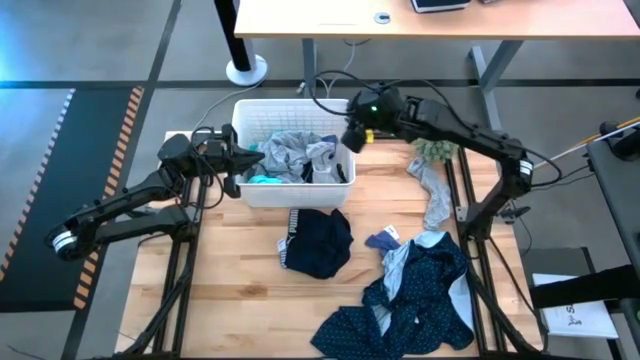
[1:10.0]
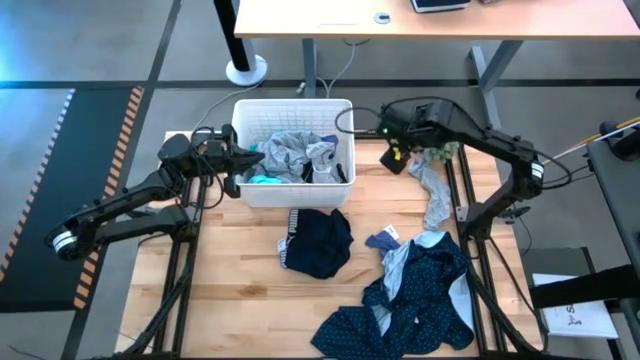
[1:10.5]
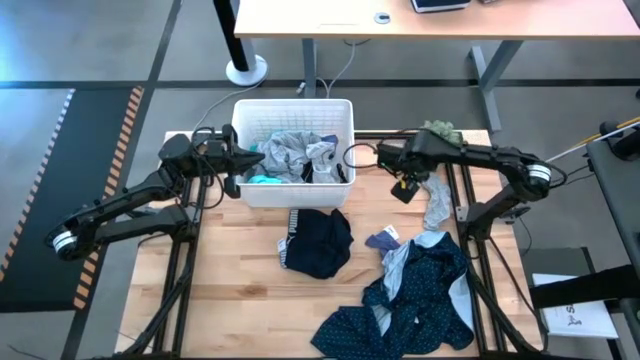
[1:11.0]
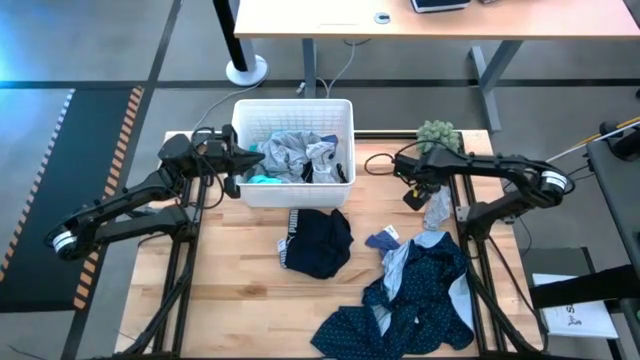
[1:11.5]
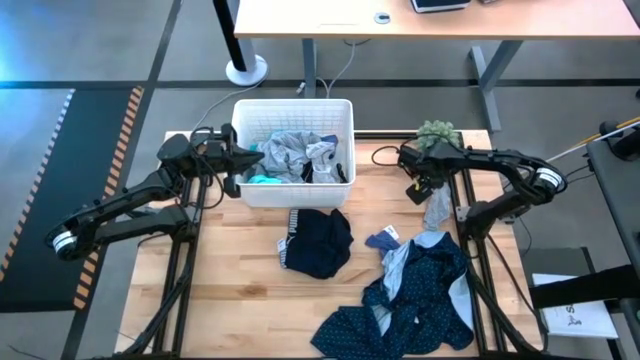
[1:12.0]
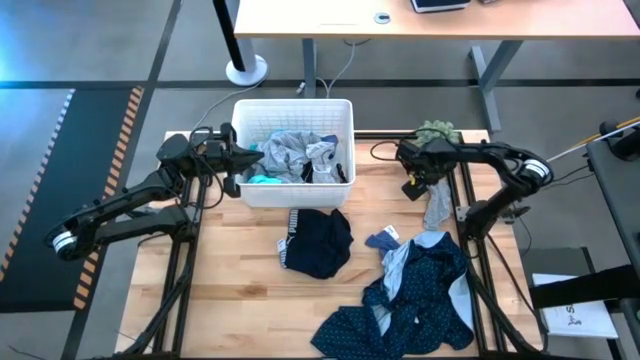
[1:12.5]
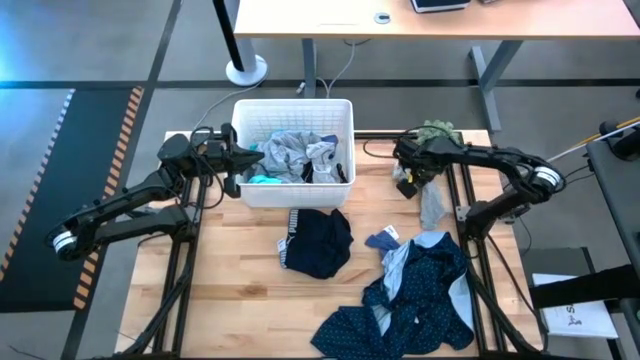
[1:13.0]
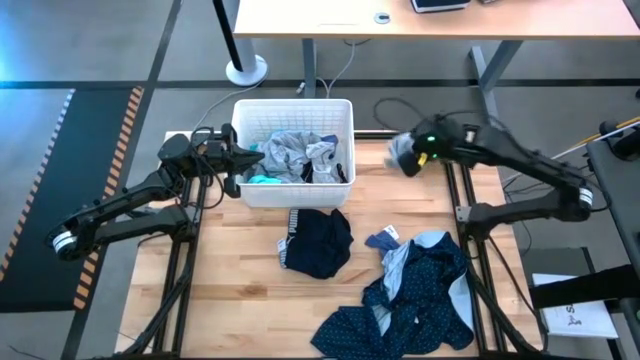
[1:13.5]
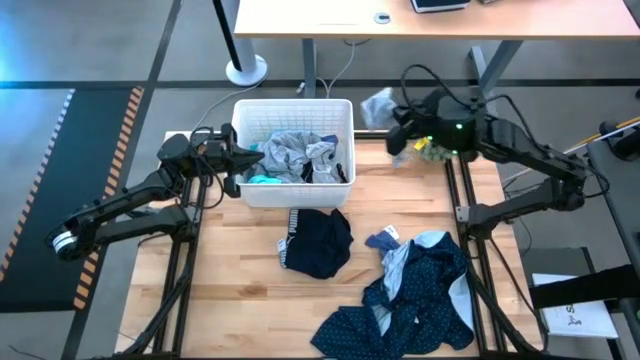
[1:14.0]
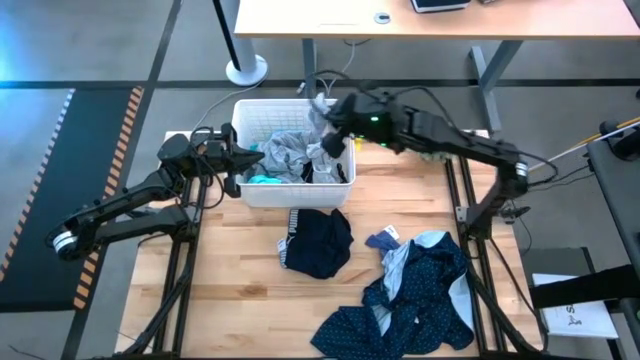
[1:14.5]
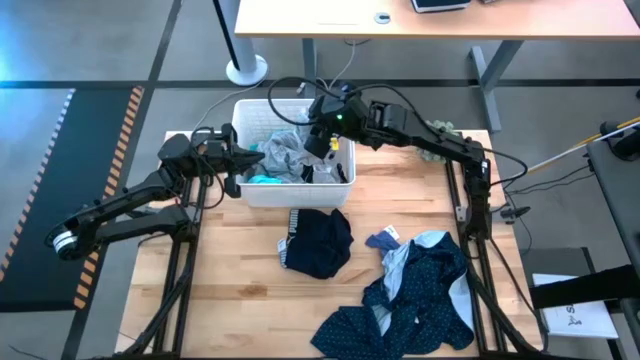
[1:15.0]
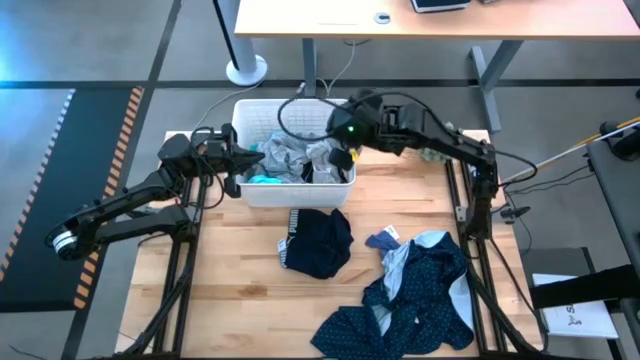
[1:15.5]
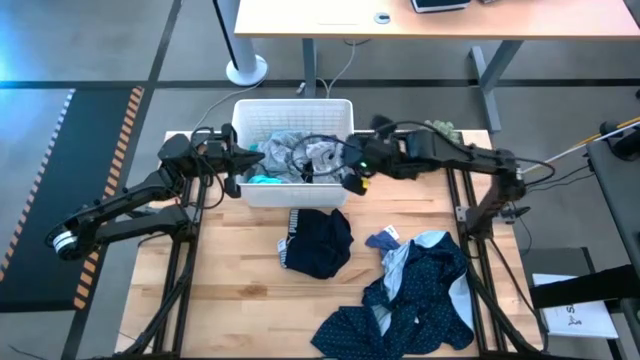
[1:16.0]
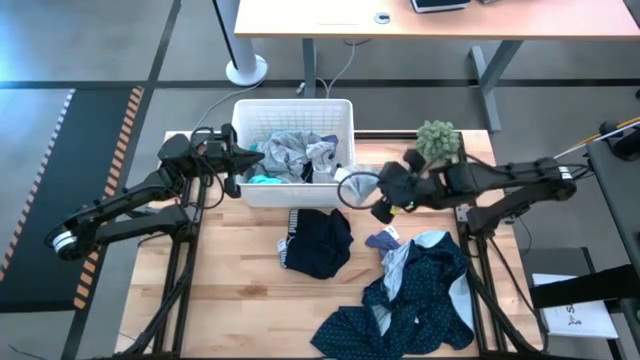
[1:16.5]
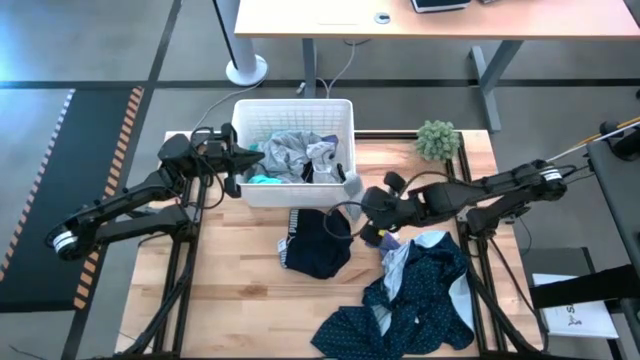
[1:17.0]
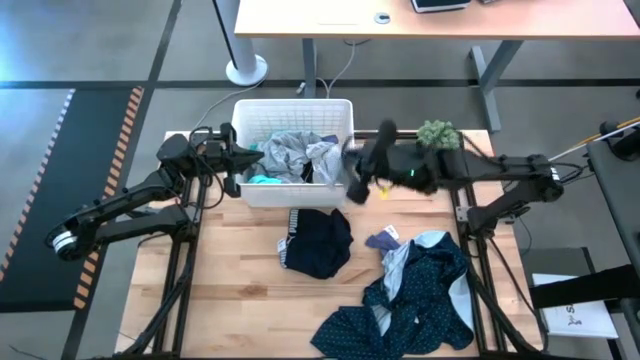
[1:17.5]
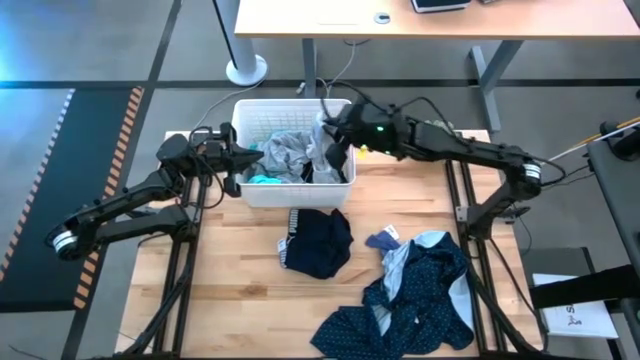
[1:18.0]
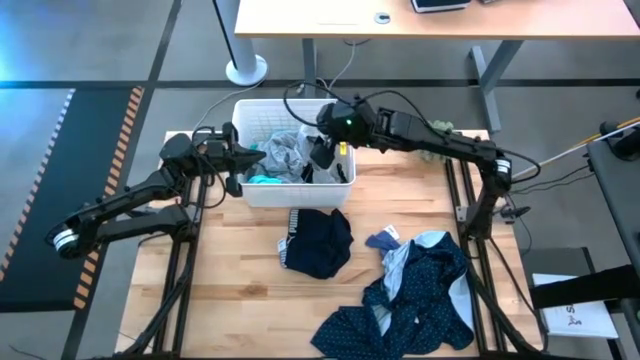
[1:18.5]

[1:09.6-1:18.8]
Task: Sort clothes
Put the gray sock into the bin

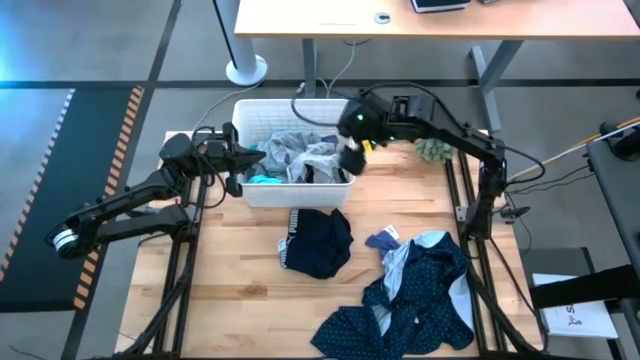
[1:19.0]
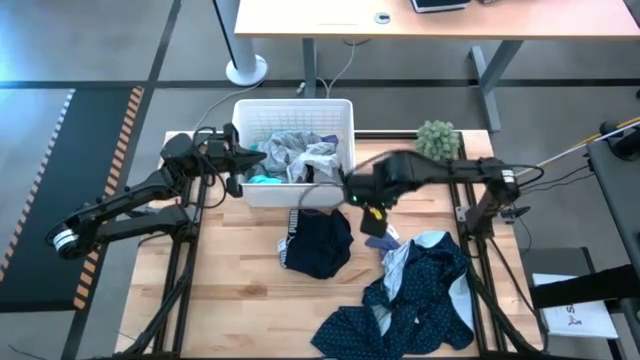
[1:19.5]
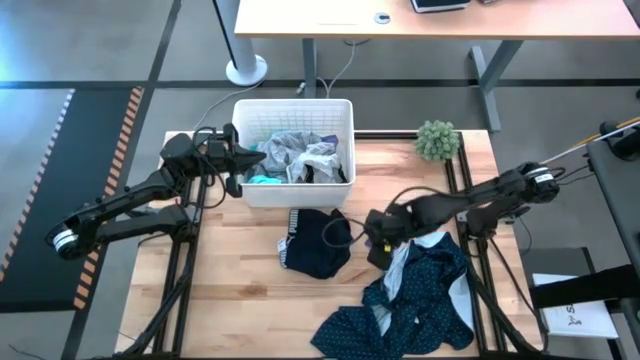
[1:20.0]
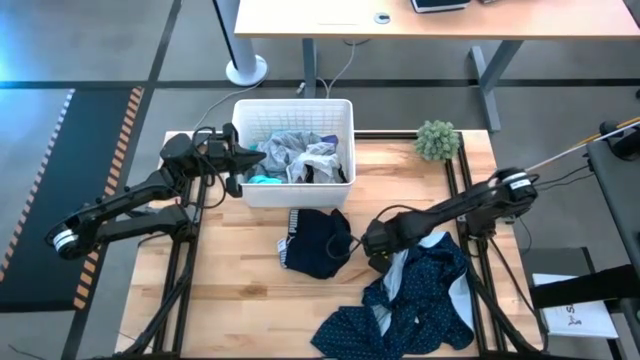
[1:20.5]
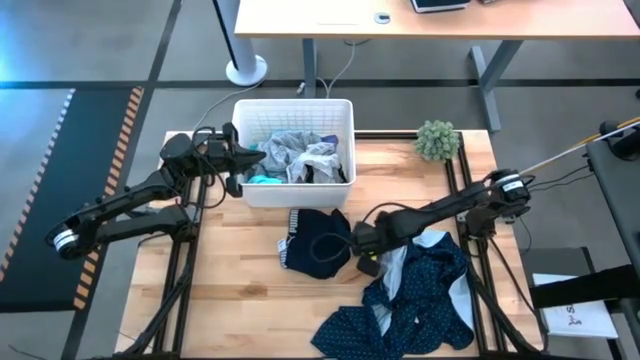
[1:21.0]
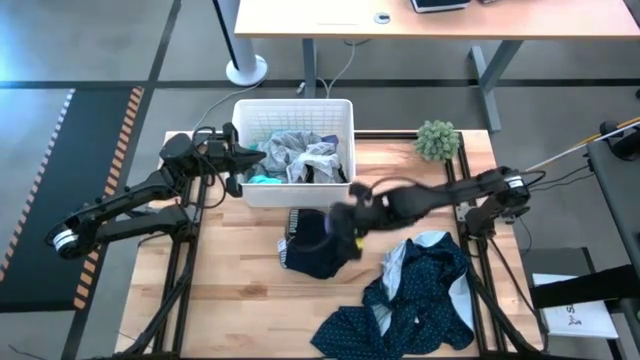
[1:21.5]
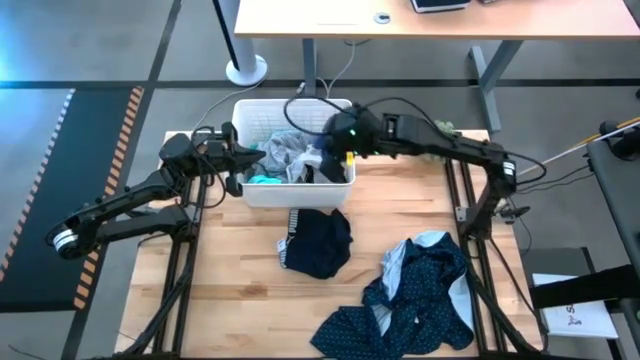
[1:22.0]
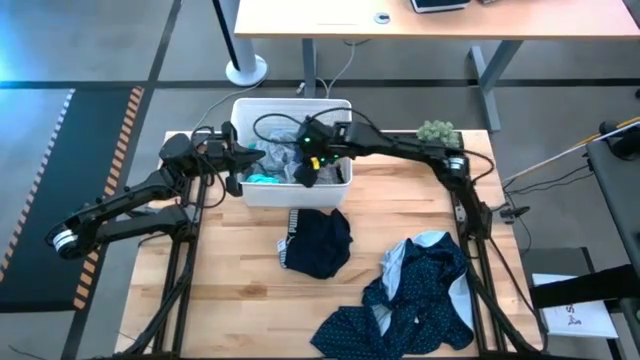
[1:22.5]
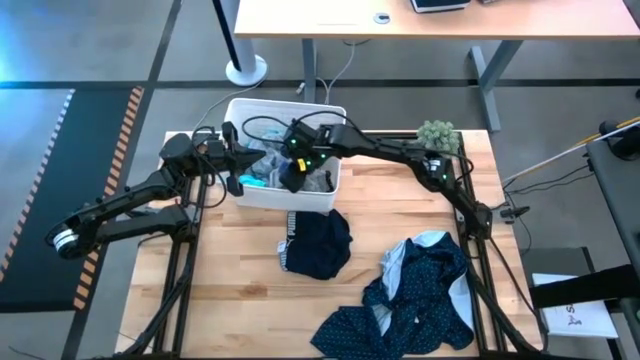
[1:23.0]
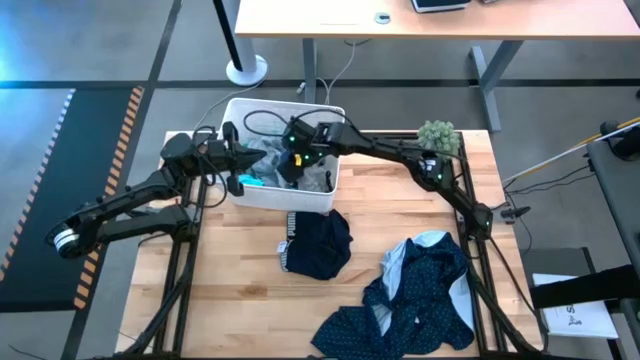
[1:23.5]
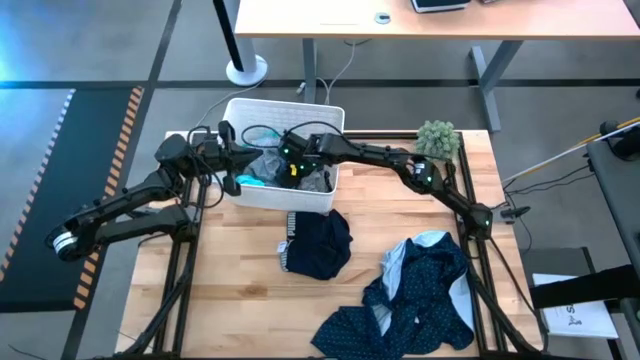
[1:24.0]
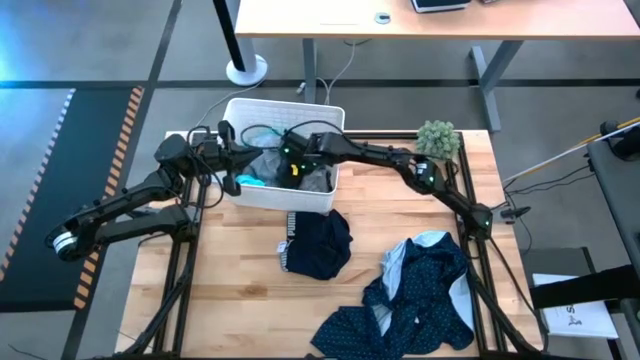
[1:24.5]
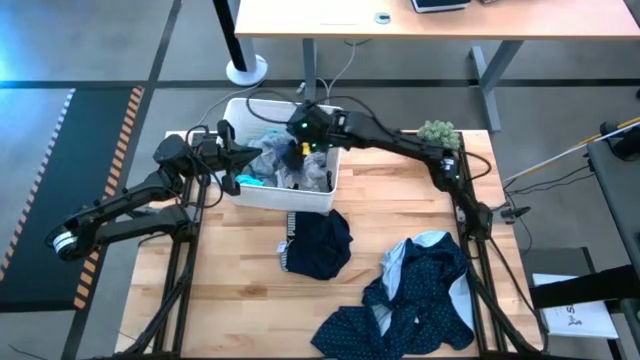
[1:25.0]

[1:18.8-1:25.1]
Put the purple sock into the bin

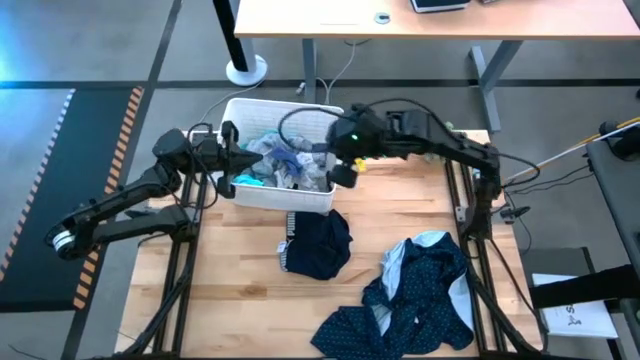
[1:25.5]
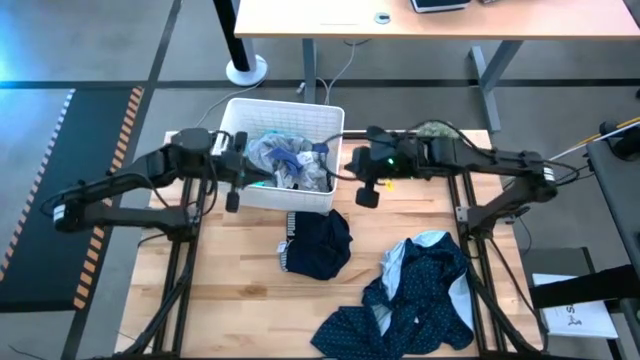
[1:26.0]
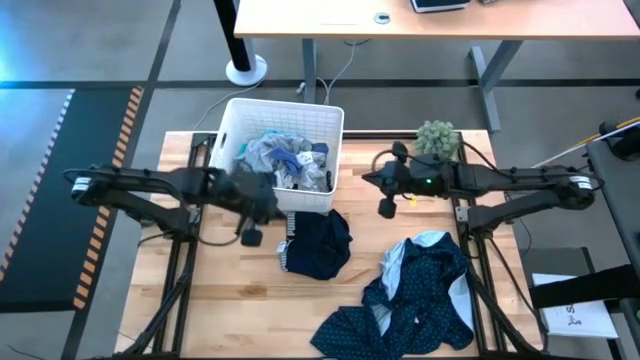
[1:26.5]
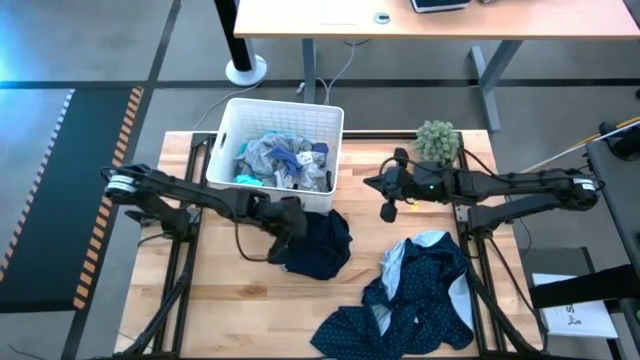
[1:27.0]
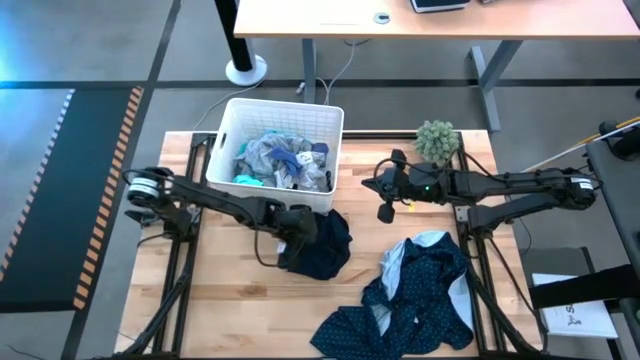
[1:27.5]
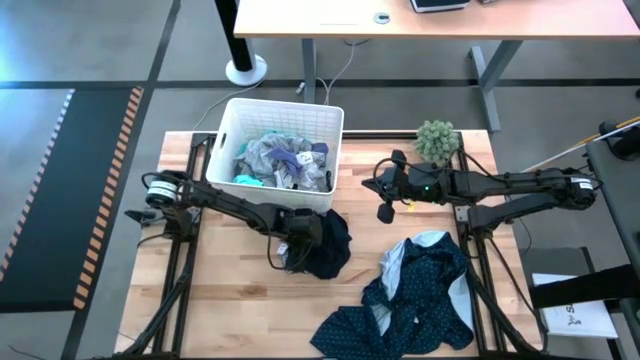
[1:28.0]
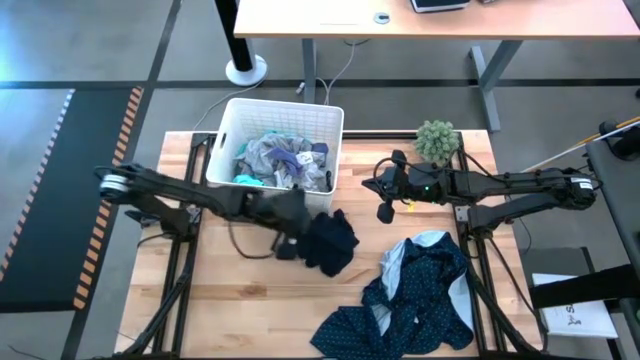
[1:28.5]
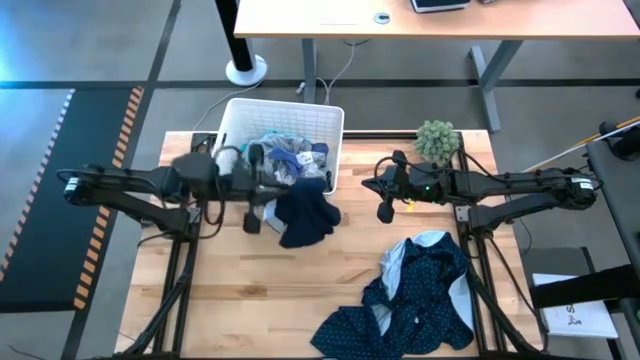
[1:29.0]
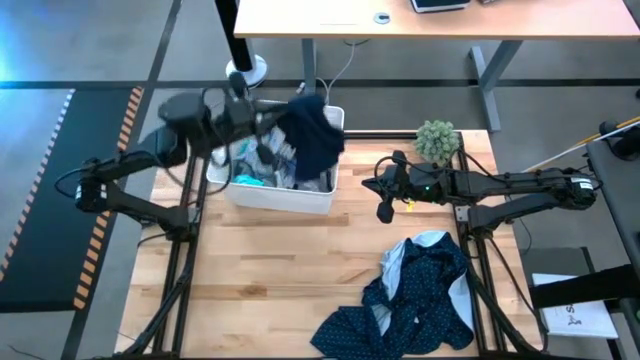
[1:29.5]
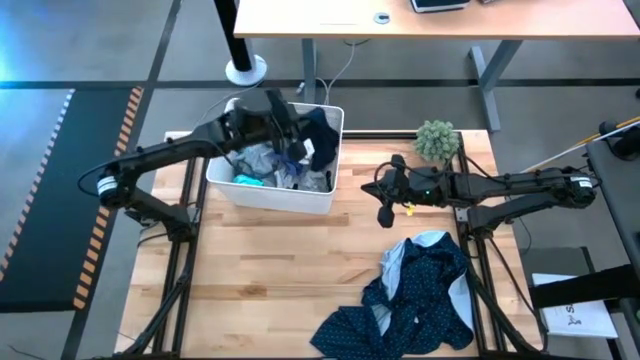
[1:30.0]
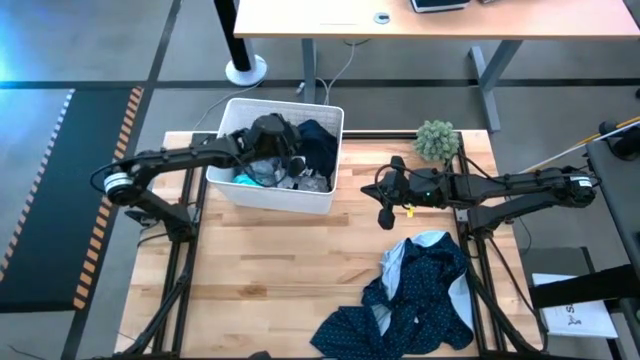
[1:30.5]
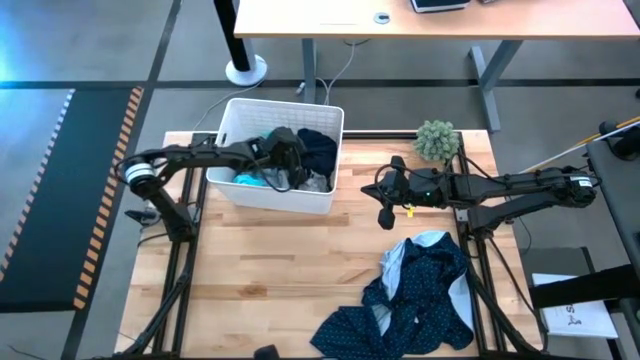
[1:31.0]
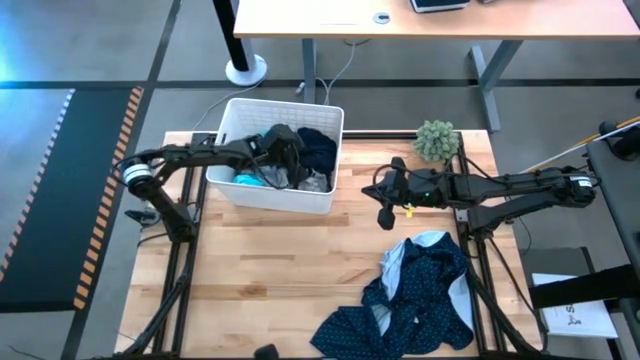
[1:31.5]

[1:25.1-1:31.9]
Put the boxers into the bin
